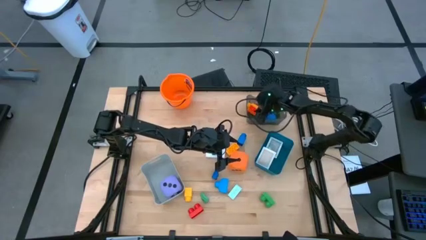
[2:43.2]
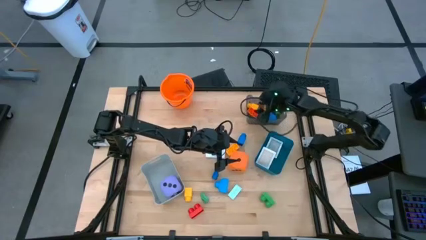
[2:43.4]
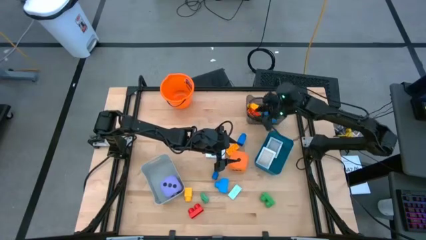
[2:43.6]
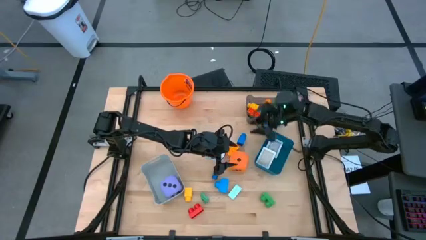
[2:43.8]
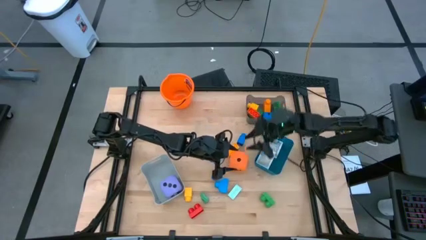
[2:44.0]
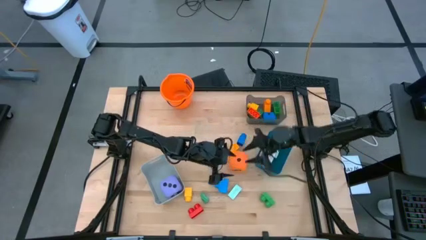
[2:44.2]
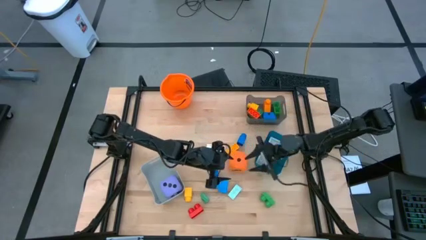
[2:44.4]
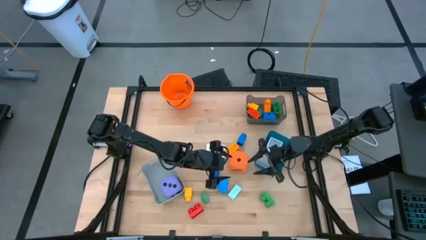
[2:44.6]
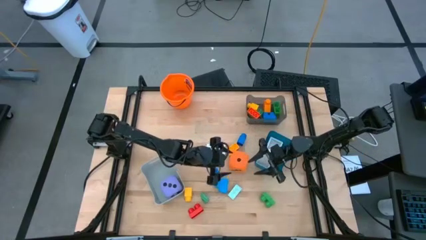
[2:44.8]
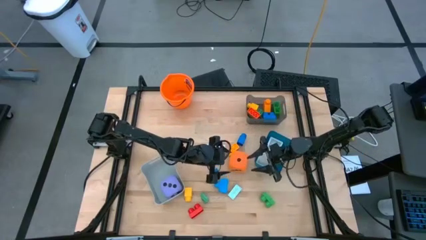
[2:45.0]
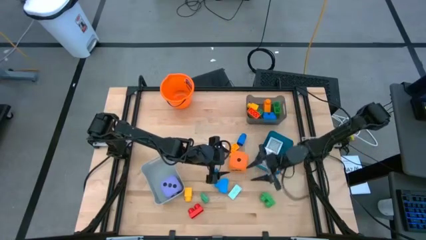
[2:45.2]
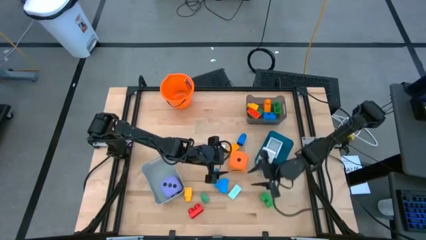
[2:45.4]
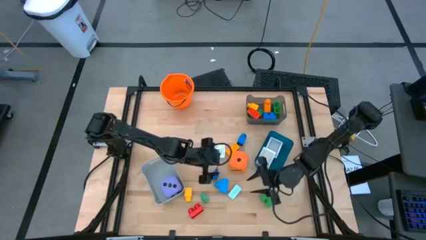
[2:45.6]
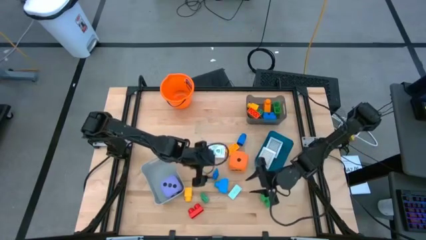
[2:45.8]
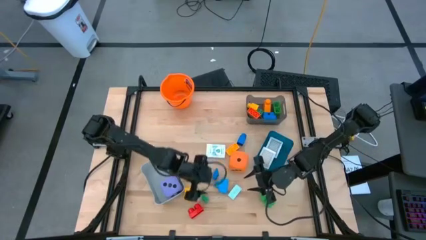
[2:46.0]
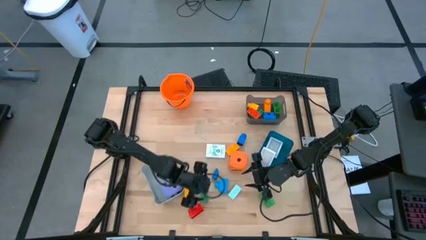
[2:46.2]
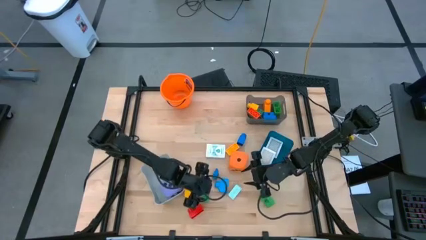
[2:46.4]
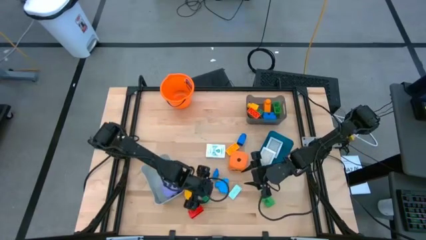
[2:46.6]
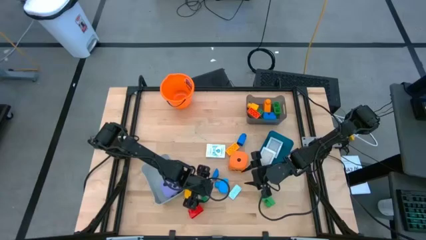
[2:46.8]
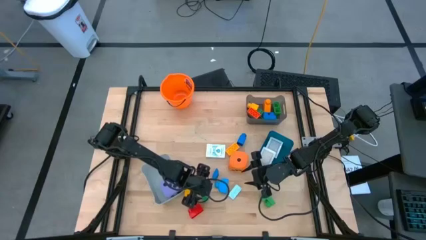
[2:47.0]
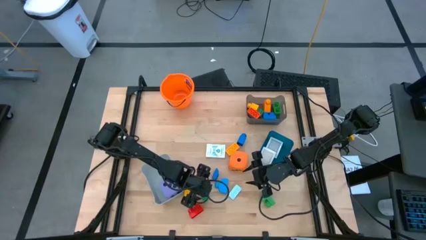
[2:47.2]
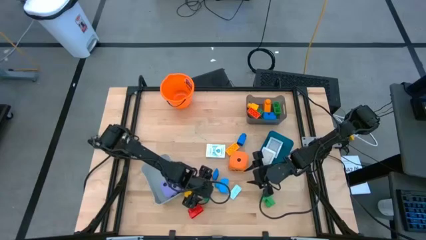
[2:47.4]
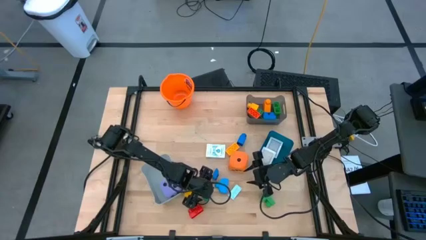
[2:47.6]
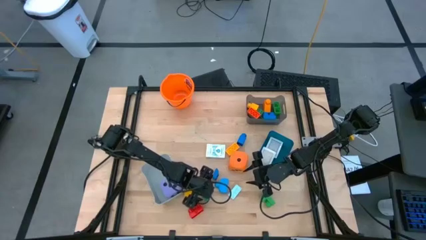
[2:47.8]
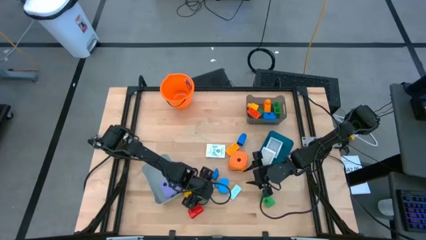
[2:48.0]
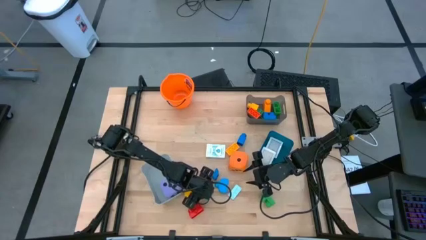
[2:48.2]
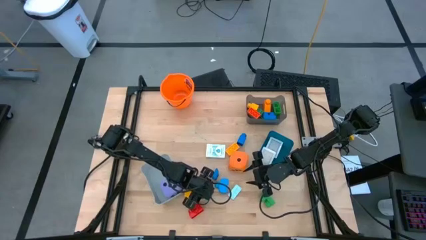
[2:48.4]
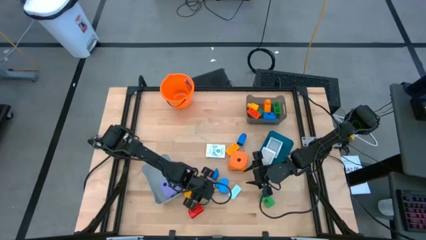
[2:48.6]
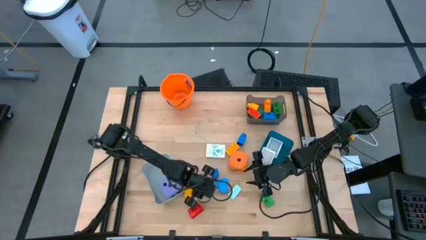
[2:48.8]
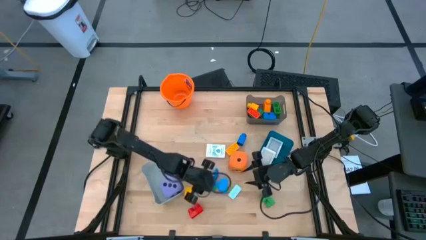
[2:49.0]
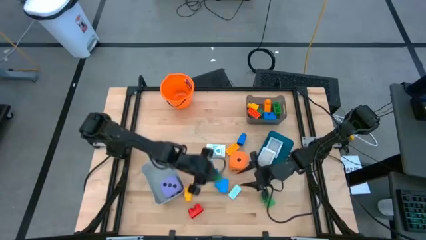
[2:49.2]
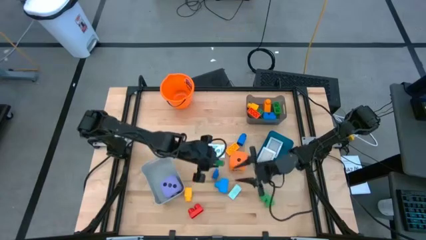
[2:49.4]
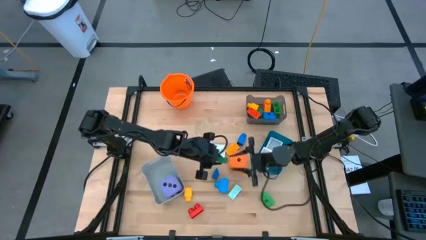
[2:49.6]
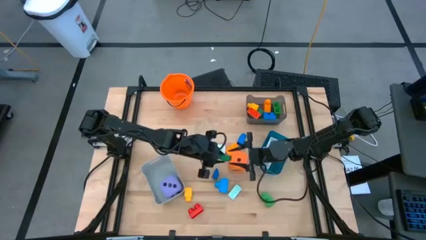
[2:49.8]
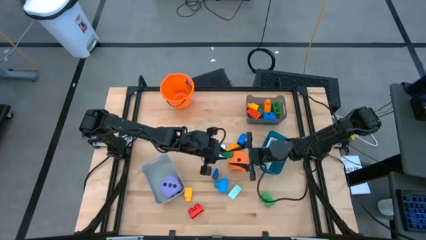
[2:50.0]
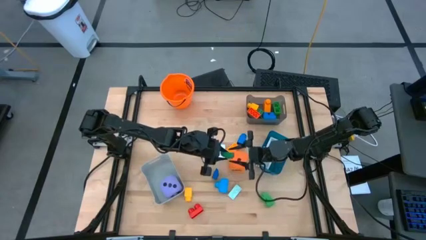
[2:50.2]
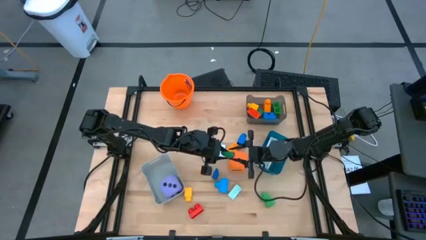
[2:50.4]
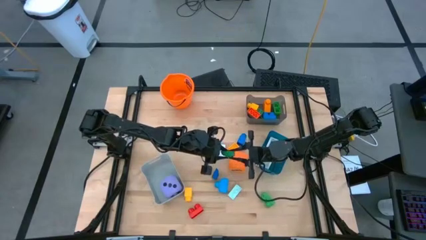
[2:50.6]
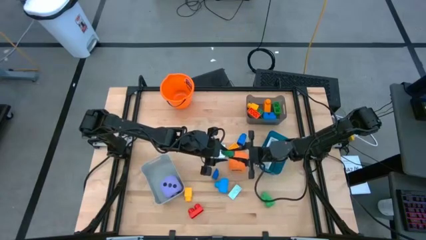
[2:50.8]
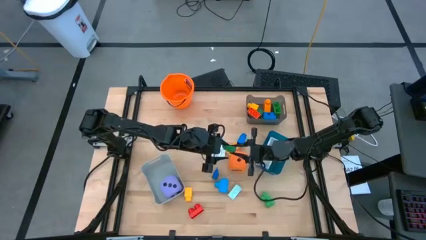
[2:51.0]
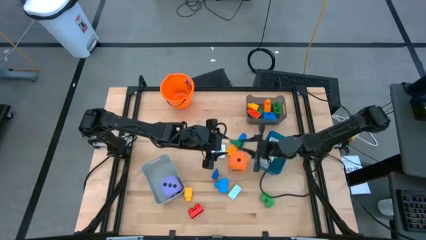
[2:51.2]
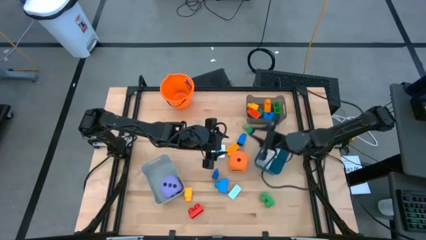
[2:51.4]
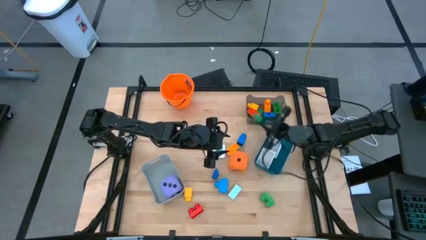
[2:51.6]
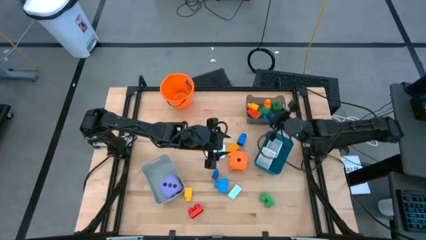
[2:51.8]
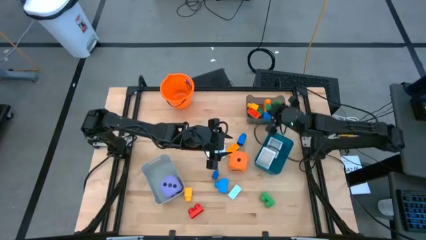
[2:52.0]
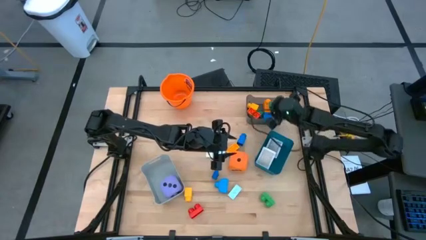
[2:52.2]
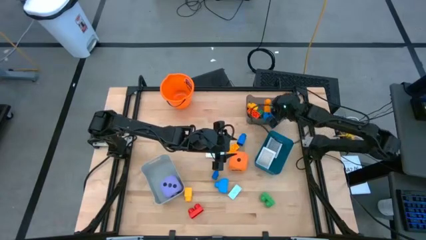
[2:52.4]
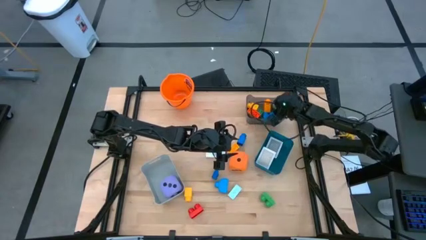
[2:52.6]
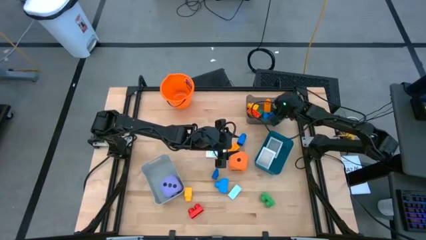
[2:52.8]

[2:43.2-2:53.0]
Task: Pick & Place Toys
Put the green game piece into the black bin

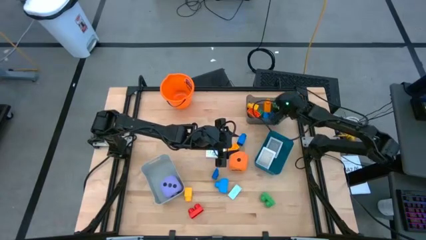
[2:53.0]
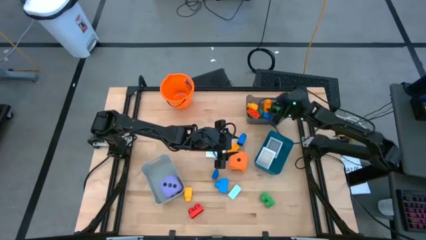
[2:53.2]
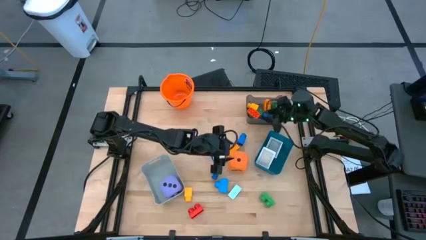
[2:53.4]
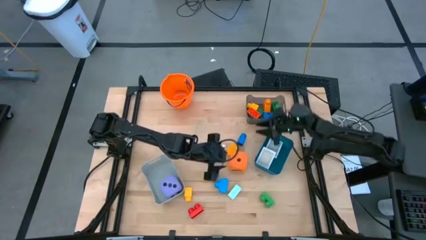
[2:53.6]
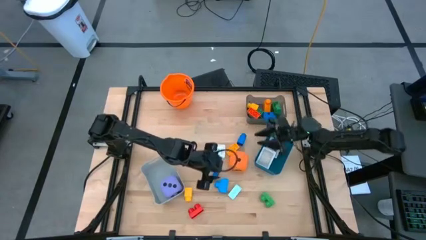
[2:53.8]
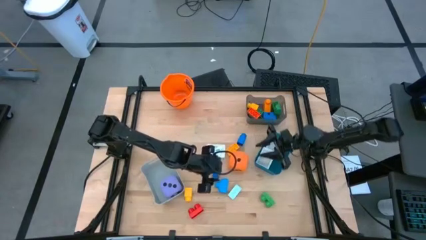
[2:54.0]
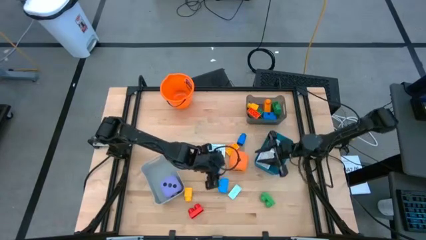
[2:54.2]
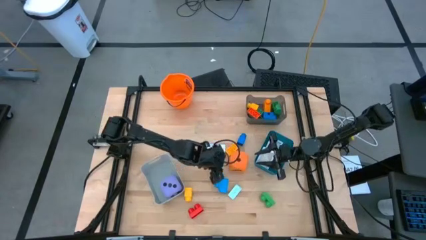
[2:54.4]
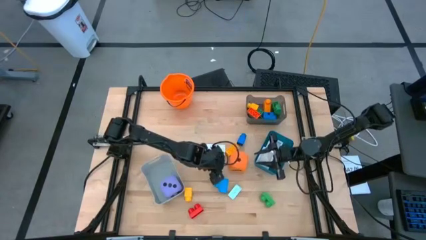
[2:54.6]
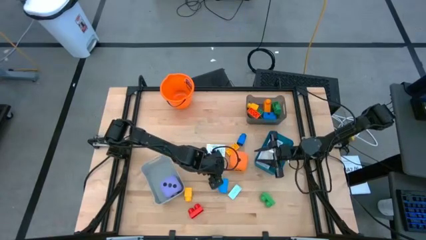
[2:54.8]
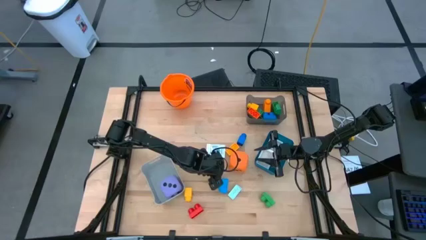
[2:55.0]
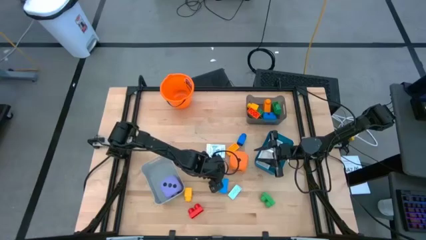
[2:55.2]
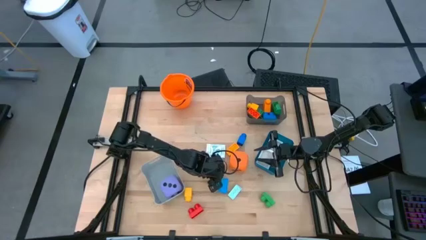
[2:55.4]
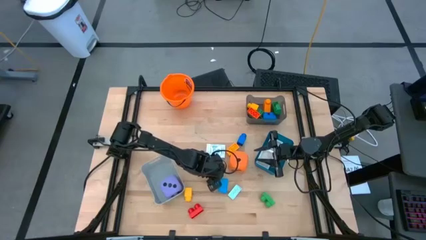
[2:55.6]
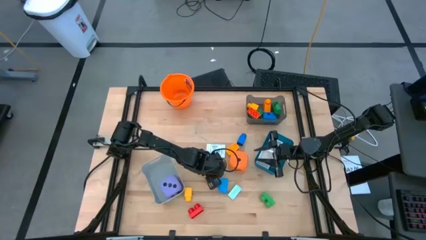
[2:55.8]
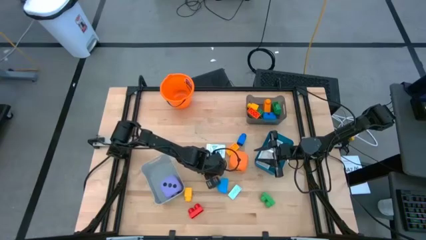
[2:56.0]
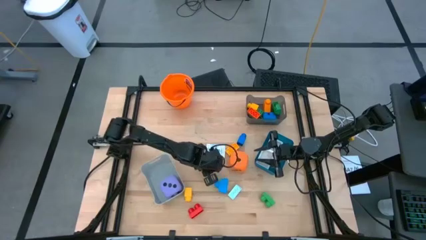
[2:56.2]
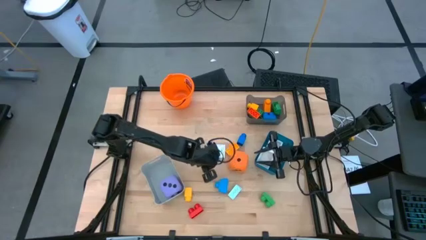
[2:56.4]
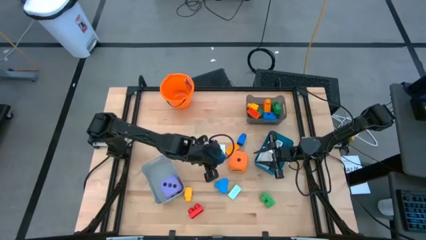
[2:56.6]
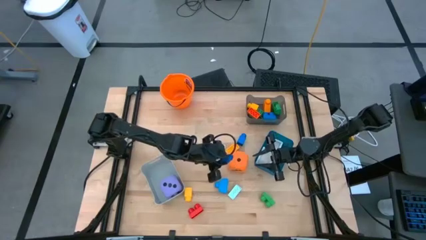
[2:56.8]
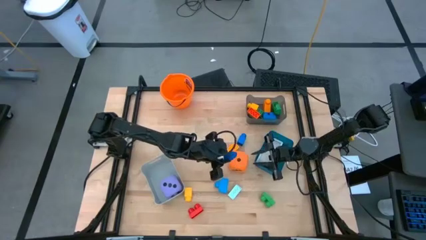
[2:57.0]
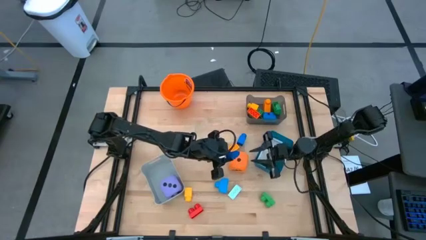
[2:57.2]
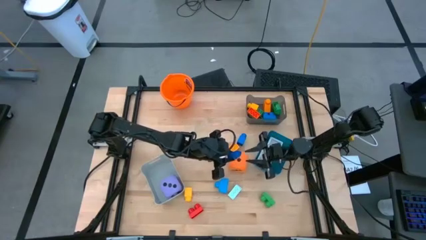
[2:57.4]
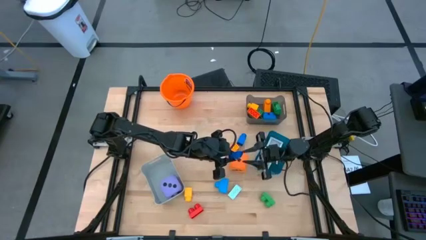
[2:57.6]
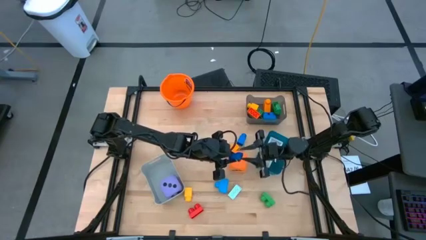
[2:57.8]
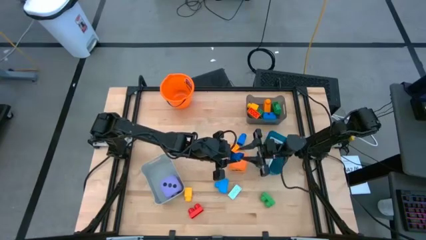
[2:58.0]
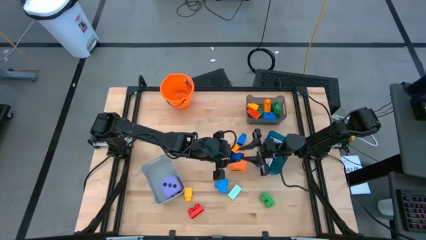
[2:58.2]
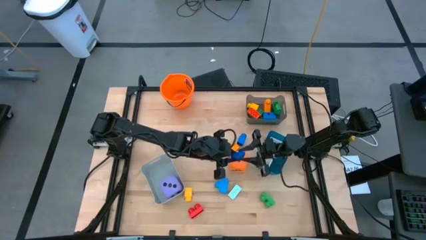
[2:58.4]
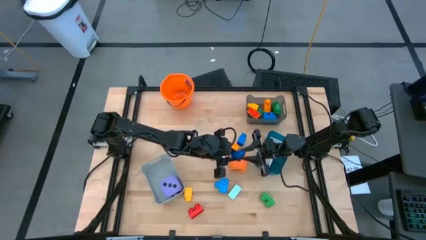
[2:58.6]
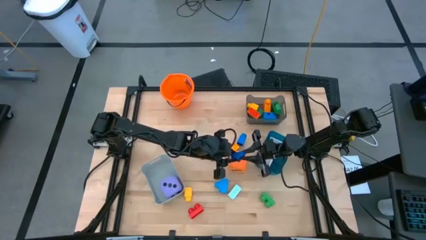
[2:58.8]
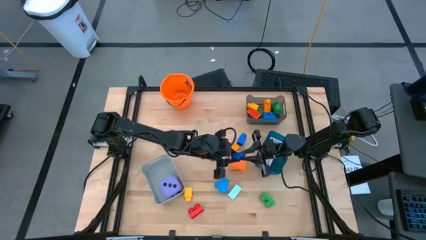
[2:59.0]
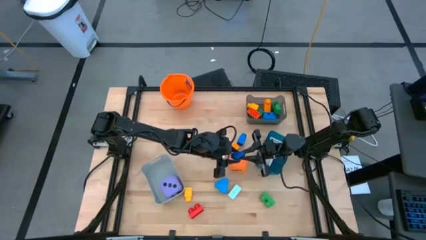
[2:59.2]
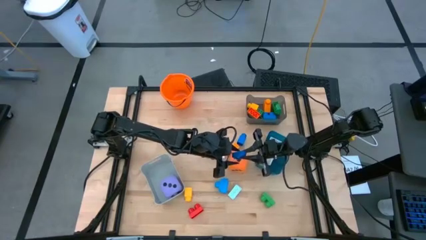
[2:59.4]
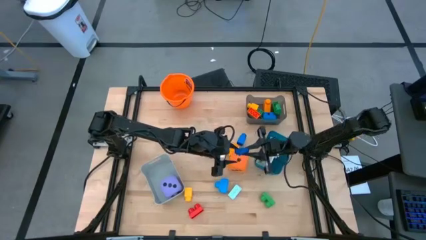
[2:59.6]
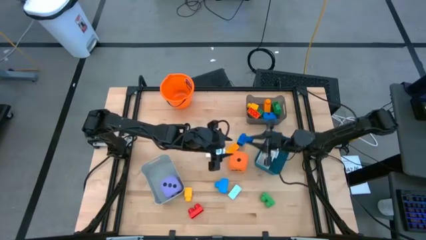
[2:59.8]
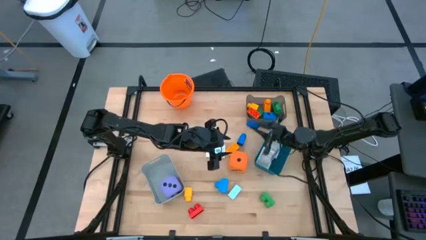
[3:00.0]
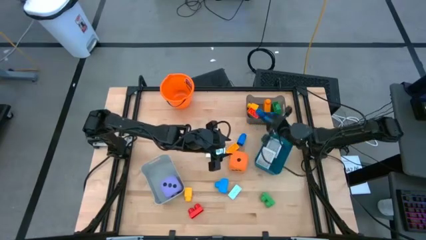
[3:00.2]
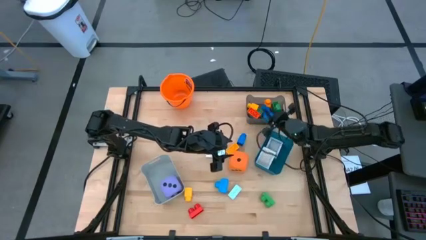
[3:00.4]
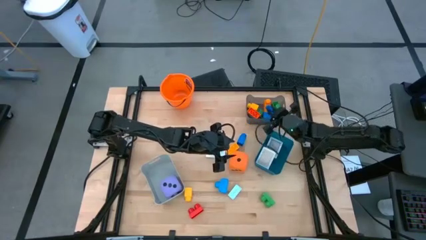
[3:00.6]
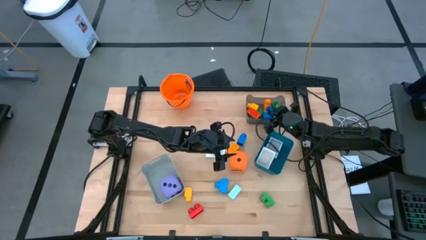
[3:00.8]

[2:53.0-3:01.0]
Put the blue game piece into the black bin
